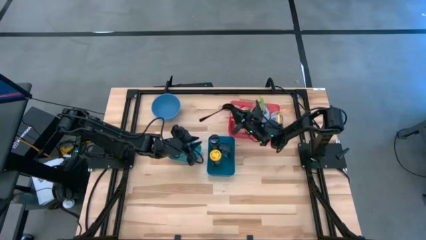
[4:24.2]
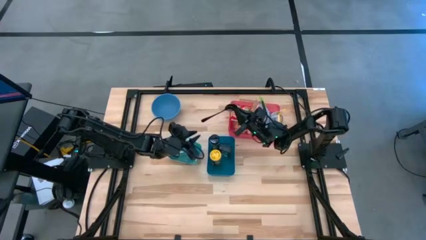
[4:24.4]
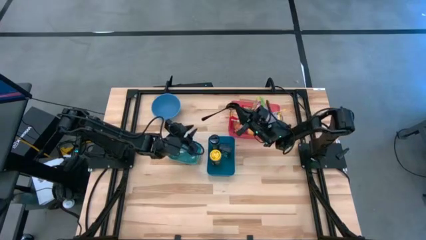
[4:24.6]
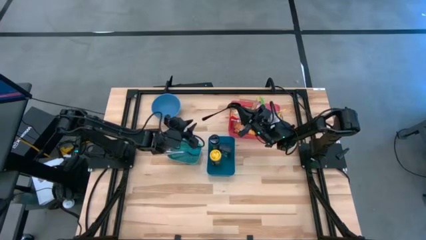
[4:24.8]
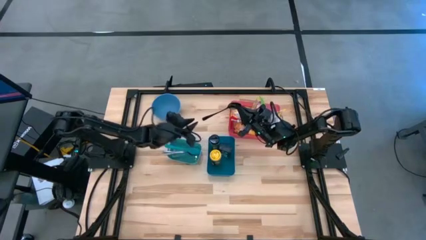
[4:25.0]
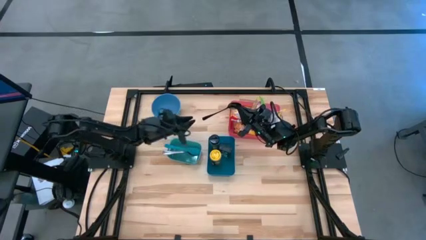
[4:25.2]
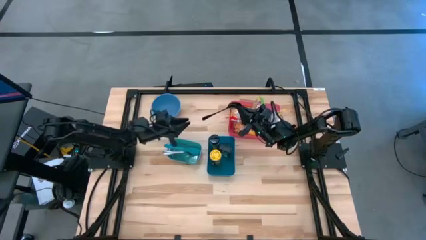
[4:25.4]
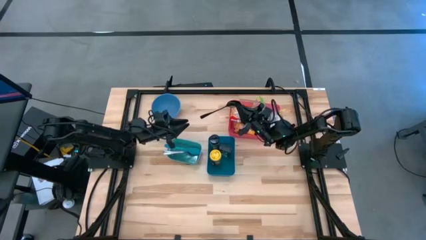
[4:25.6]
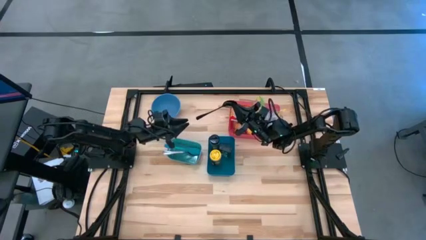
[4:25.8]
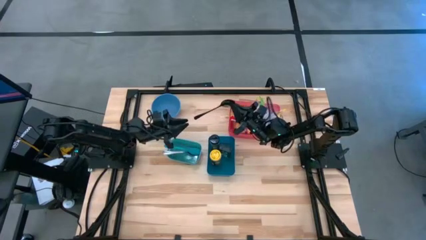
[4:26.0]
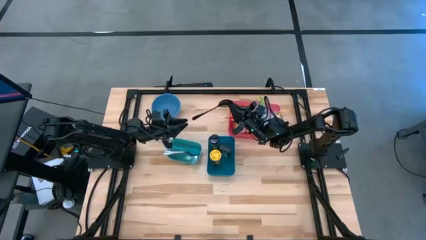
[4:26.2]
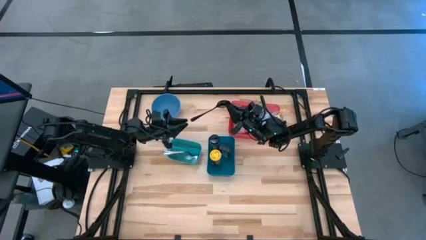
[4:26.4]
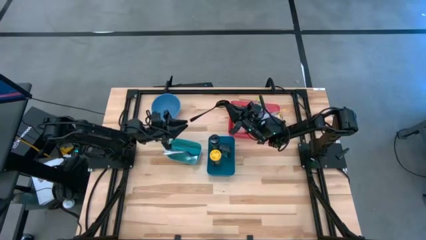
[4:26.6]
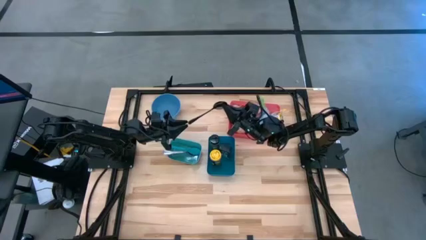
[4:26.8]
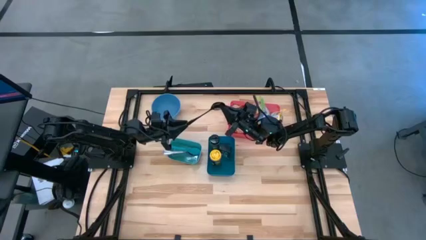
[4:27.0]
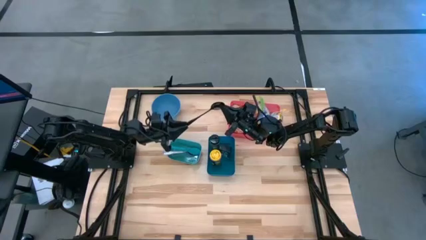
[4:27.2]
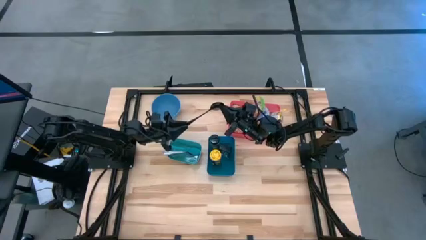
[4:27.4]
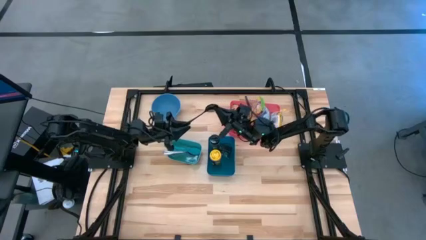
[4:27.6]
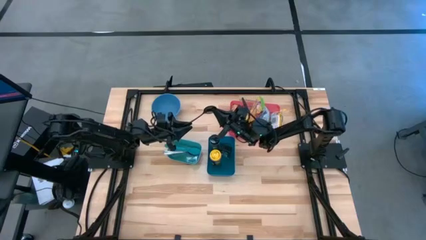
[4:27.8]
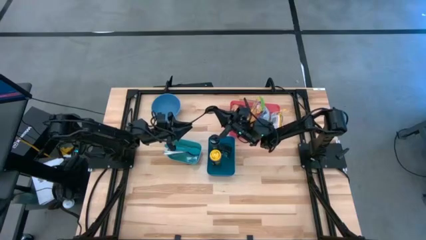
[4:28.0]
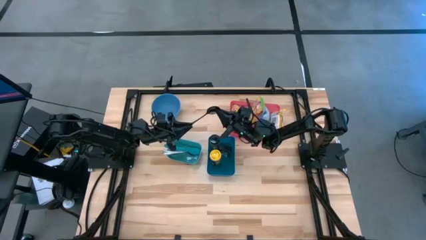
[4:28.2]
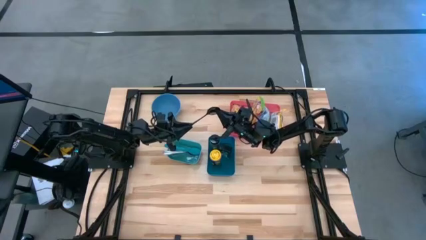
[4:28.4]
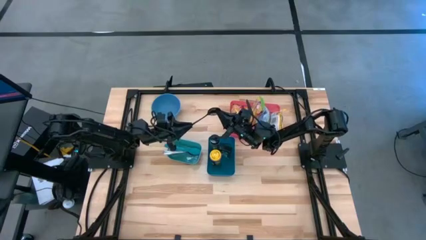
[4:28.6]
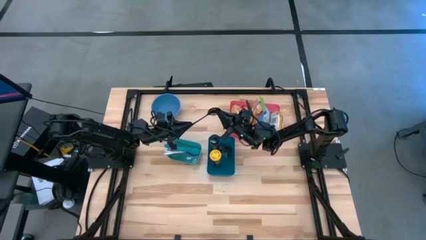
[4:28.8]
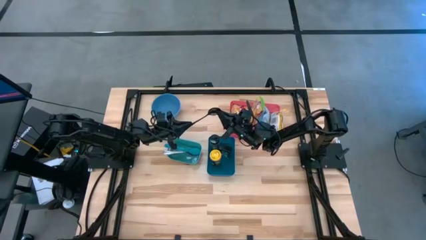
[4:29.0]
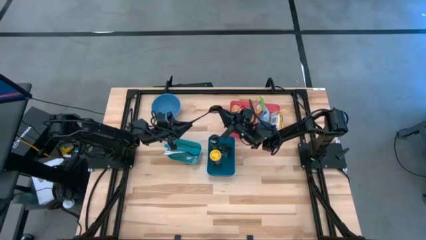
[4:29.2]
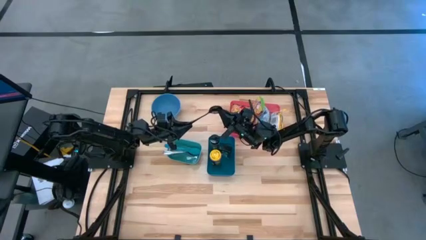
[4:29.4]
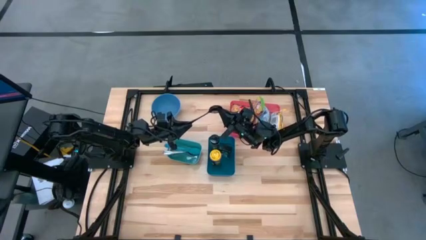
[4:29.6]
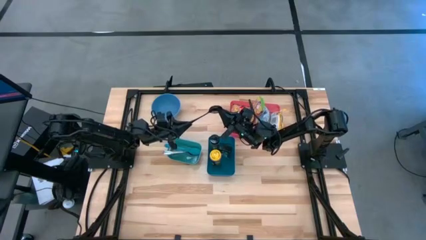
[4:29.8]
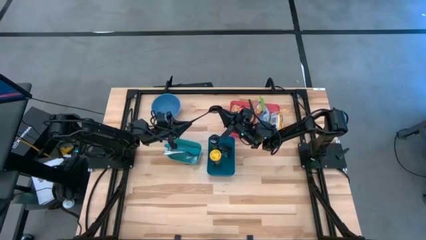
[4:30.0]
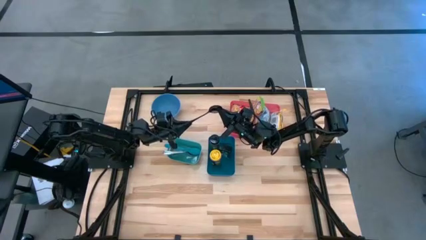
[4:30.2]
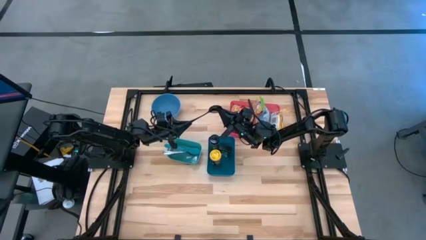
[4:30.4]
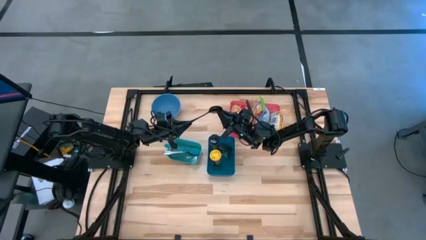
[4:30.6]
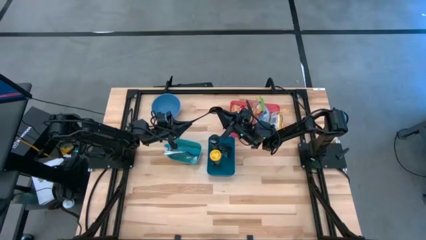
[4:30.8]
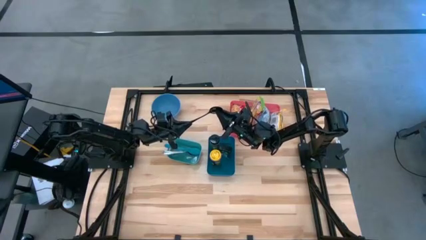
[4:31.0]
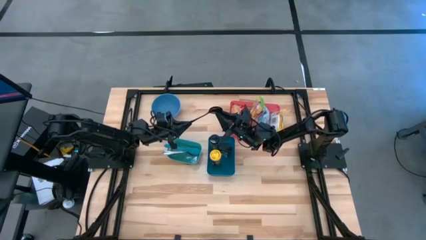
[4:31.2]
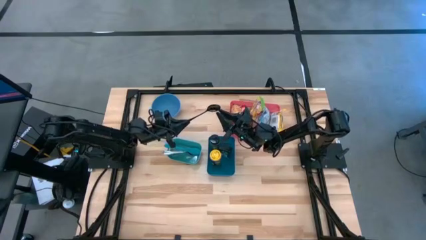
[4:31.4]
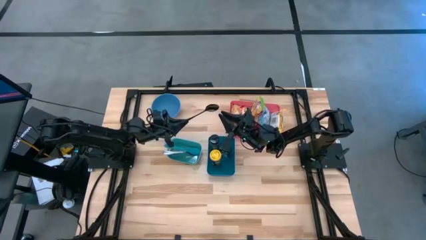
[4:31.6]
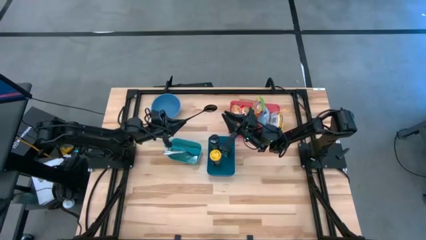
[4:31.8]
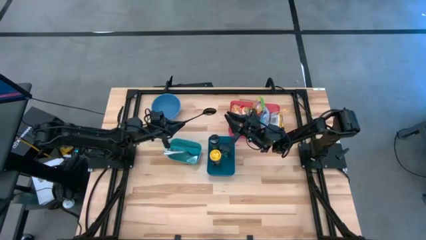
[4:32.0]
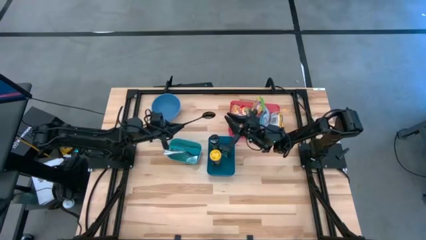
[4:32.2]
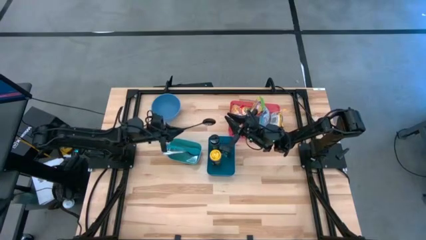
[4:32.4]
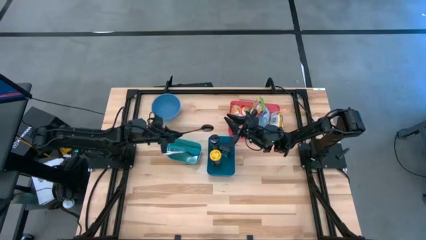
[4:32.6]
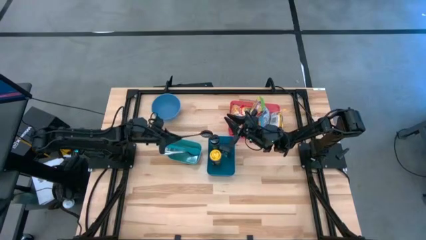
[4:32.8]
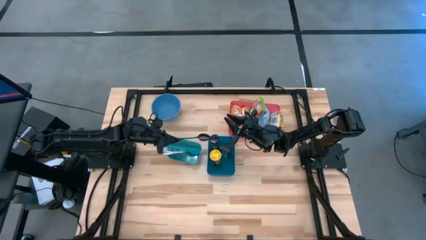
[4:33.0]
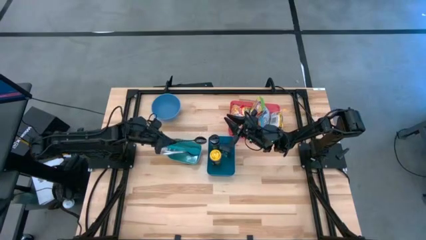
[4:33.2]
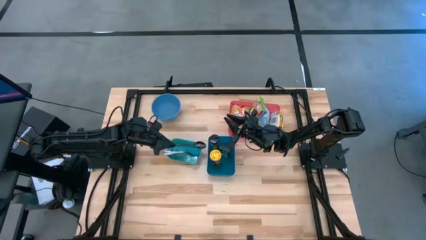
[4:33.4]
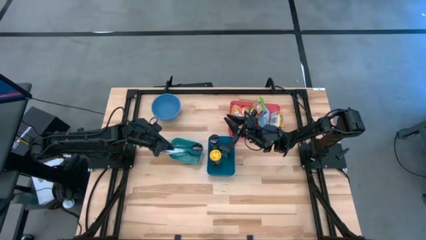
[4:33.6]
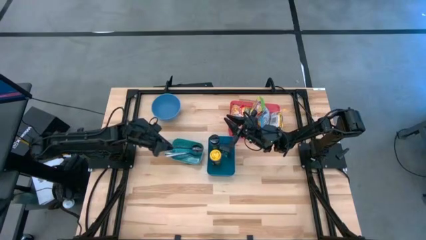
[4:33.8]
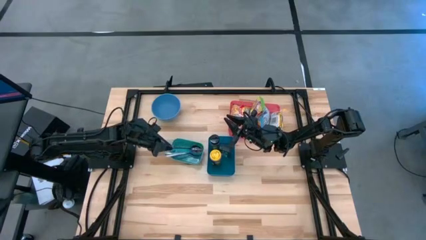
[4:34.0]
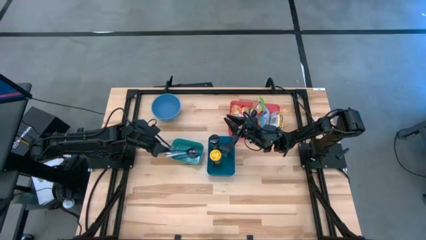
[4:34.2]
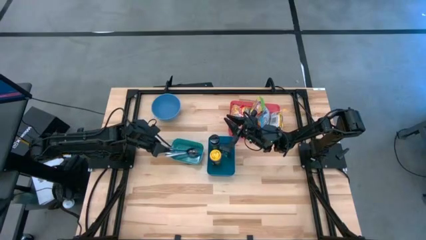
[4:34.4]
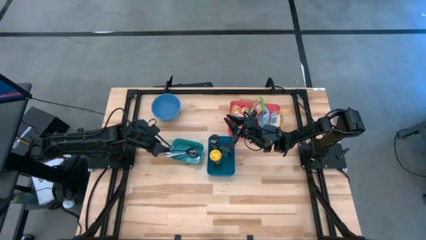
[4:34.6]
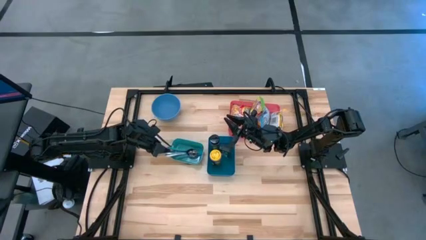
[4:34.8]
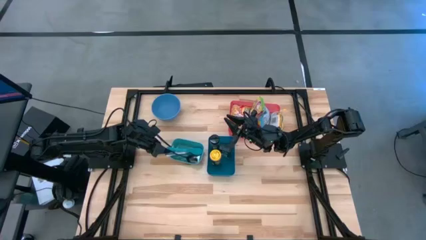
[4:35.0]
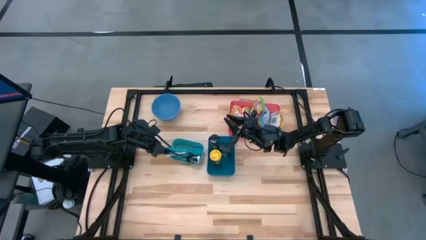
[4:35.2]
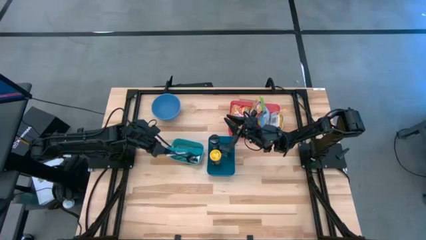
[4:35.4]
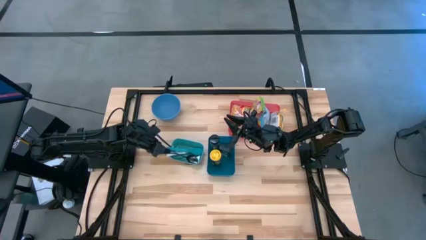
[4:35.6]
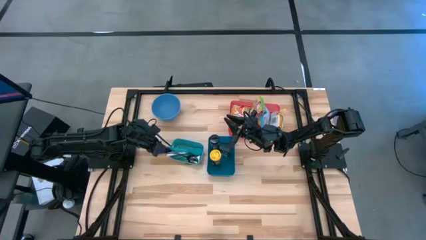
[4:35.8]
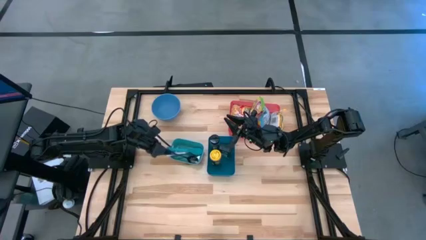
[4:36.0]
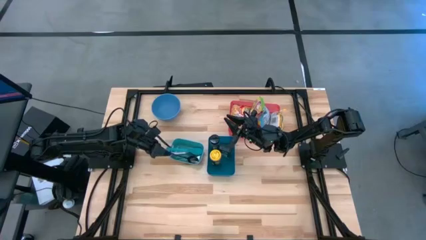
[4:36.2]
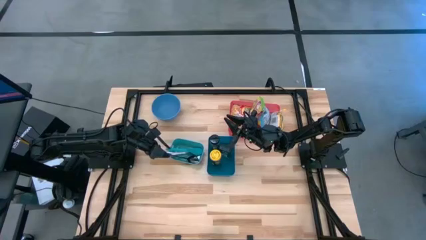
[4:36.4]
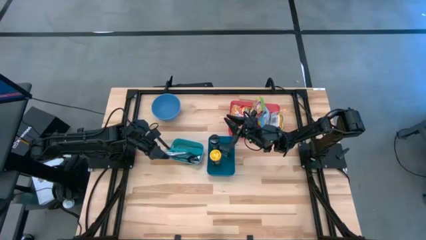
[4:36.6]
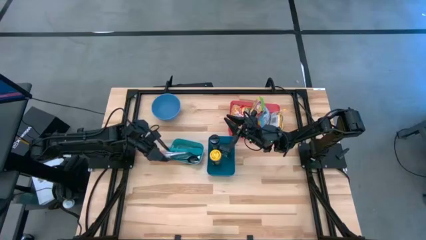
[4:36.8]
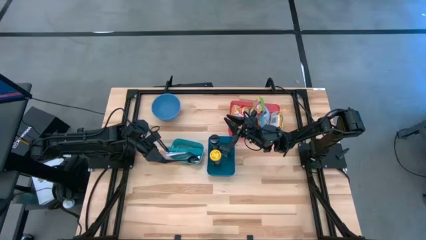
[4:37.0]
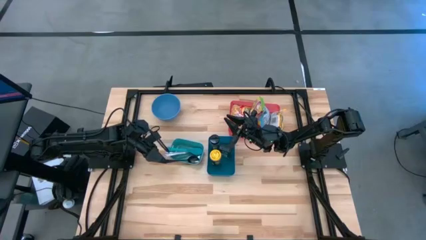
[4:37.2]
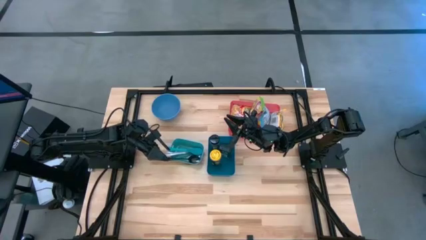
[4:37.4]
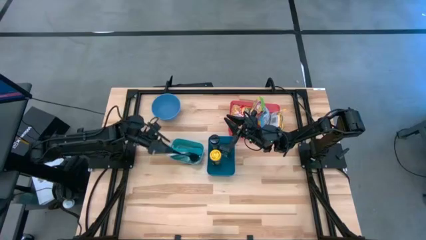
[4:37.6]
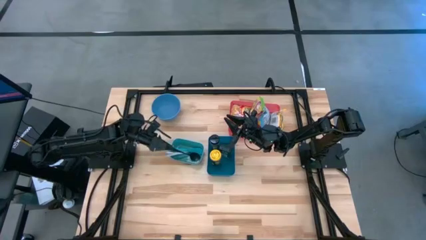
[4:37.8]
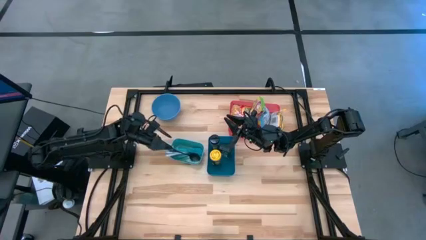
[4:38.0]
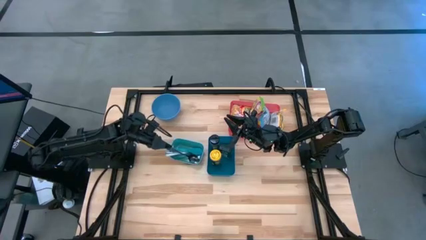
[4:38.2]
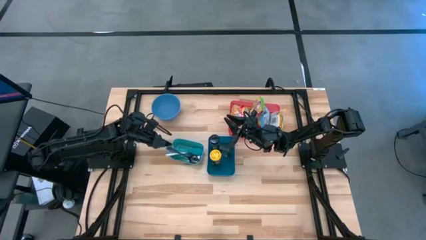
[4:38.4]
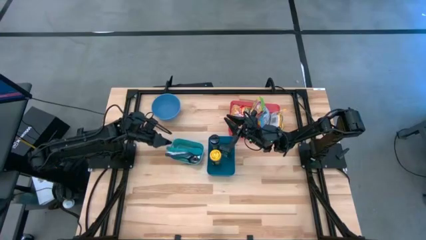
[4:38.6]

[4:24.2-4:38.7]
Task: Pick & Place Food Item
Put the black spoon into the green bin

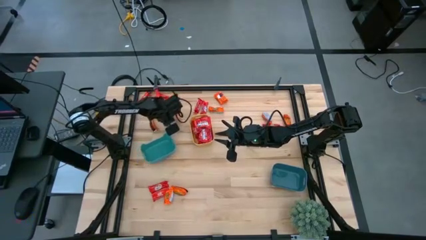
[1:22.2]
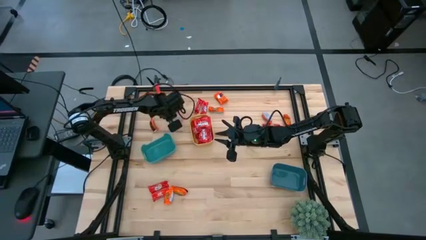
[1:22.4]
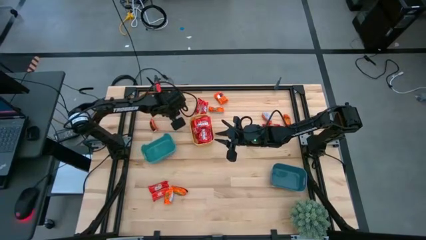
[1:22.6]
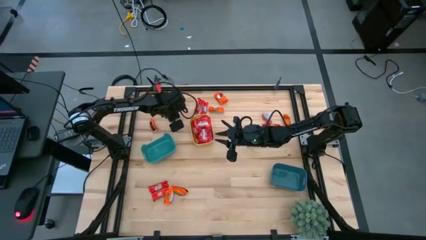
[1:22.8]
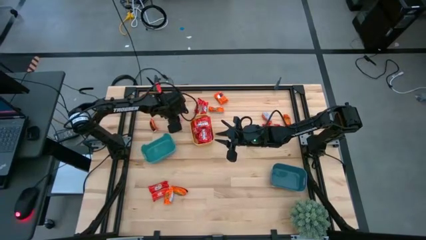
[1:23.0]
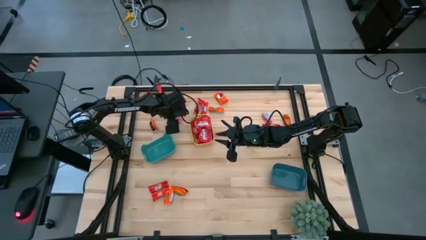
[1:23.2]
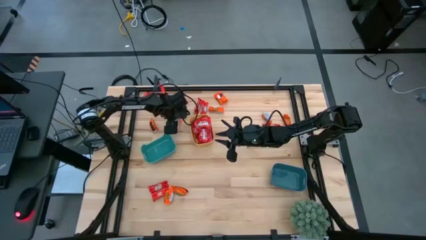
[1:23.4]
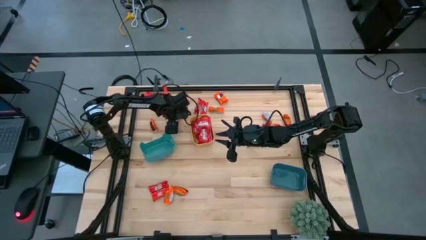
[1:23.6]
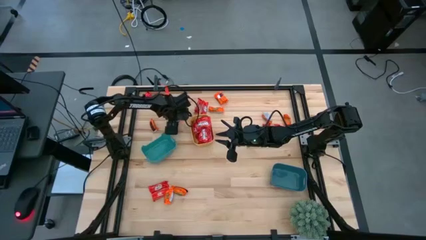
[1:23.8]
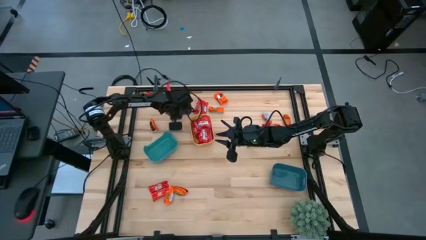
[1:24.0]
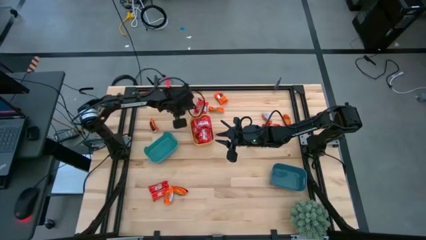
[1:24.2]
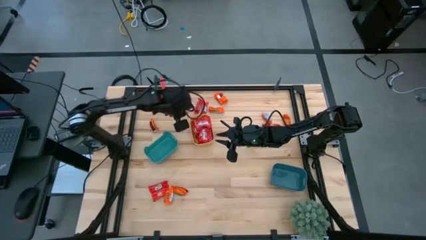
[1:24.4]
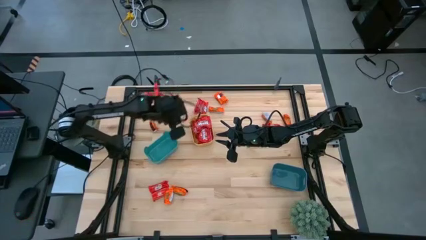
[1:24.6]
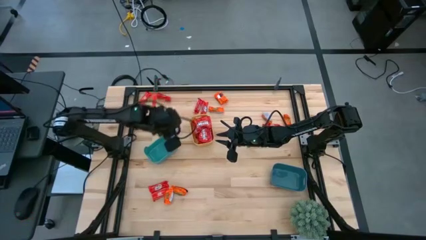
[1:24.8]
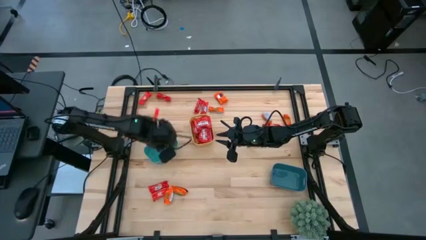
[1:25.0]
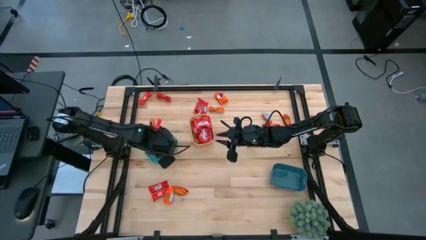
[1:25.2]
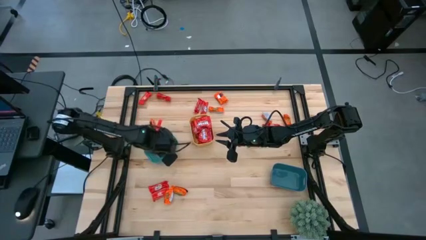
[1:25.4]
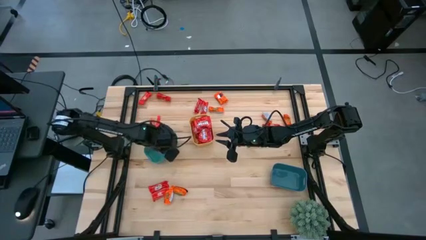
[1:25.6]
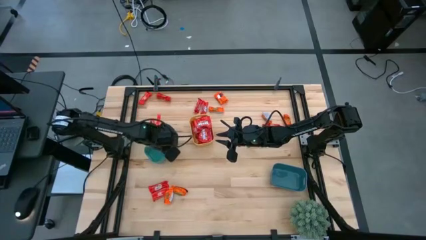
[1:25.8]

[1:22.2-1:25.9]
Task: Sort candy
Put the orange candy into the green bin
